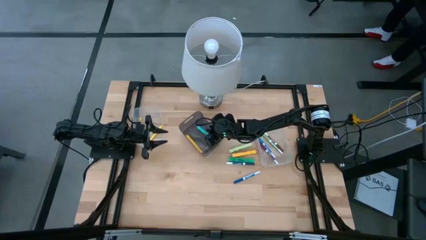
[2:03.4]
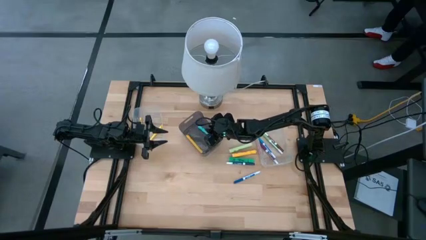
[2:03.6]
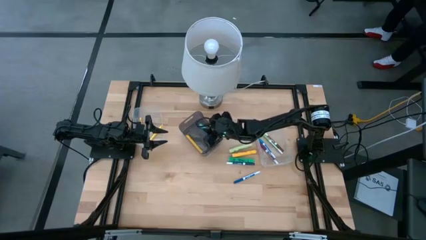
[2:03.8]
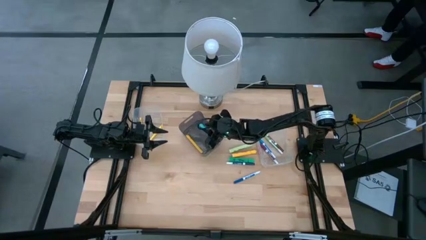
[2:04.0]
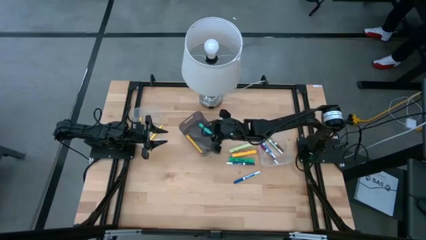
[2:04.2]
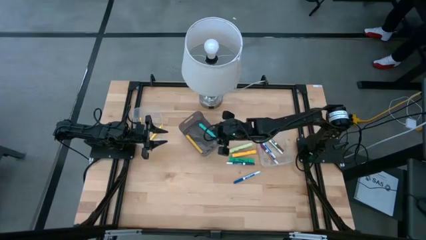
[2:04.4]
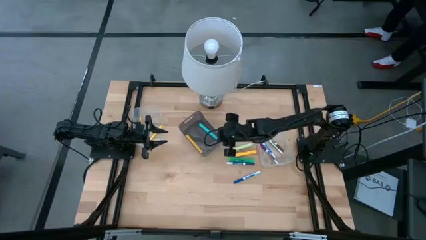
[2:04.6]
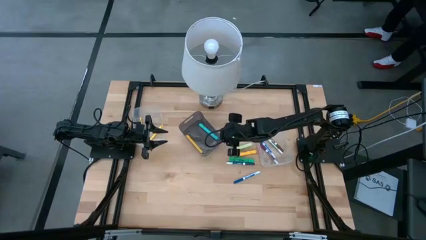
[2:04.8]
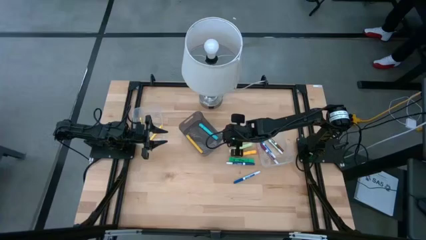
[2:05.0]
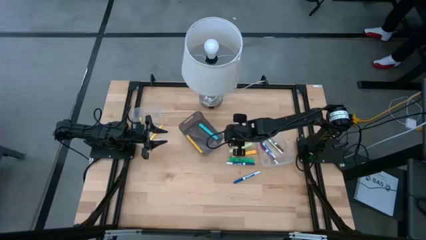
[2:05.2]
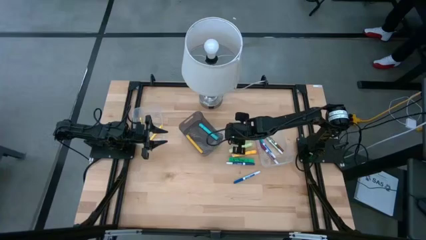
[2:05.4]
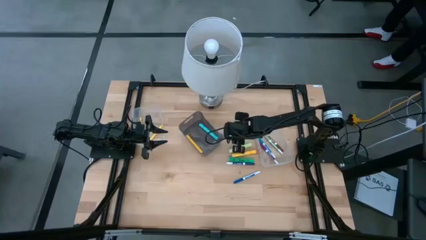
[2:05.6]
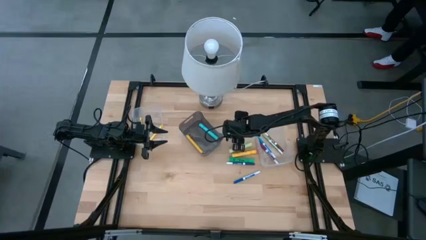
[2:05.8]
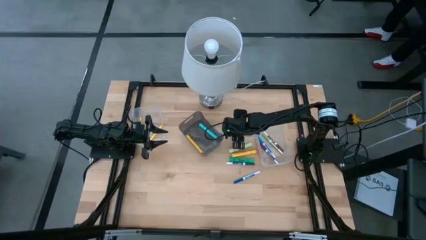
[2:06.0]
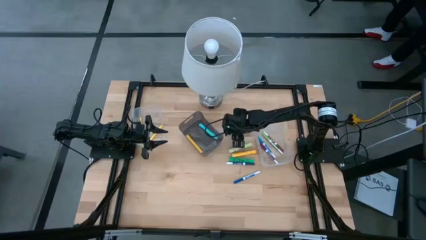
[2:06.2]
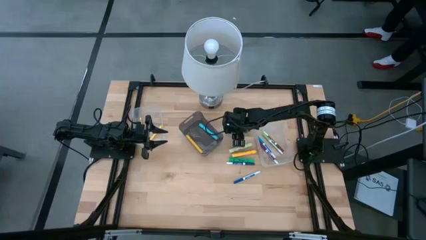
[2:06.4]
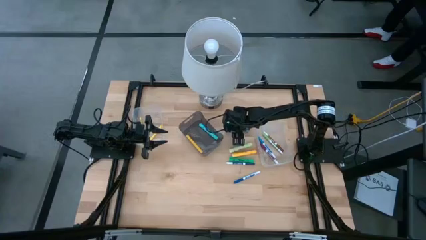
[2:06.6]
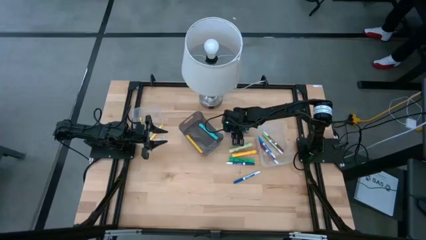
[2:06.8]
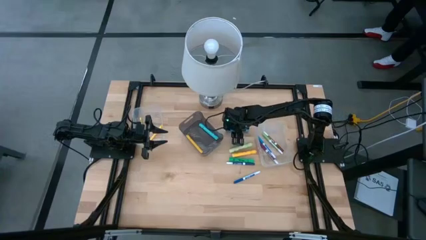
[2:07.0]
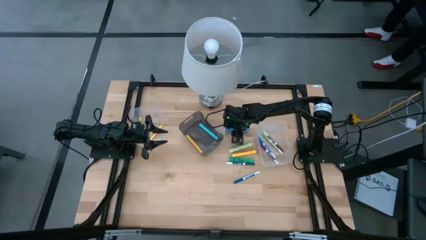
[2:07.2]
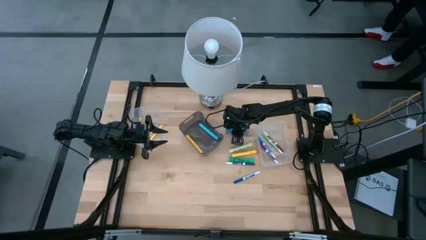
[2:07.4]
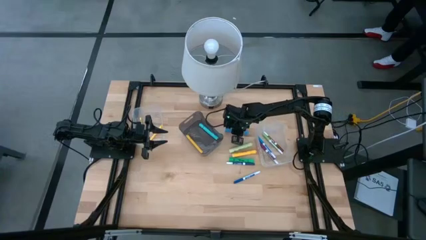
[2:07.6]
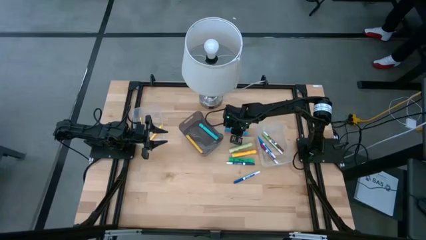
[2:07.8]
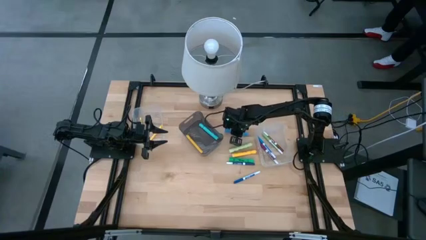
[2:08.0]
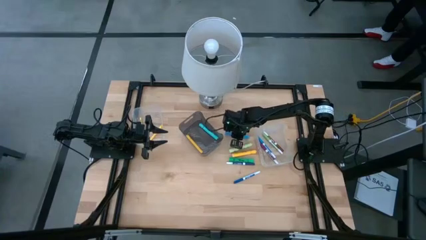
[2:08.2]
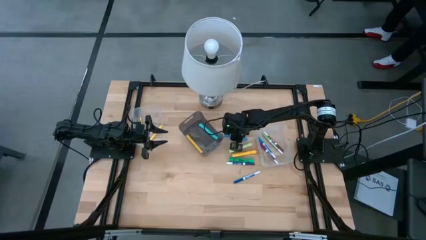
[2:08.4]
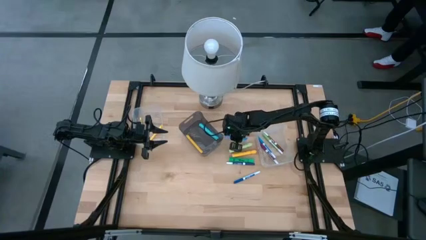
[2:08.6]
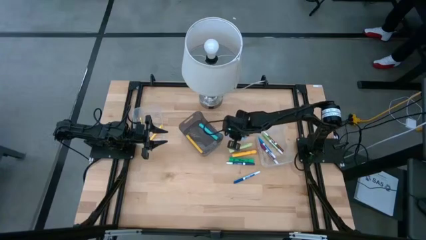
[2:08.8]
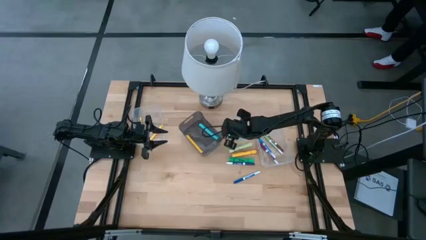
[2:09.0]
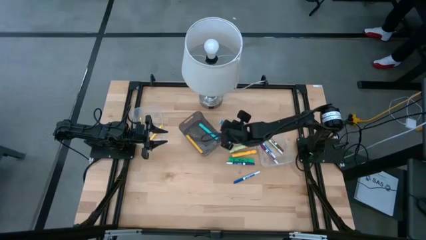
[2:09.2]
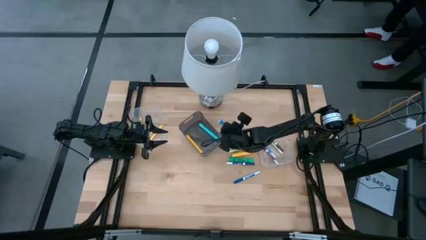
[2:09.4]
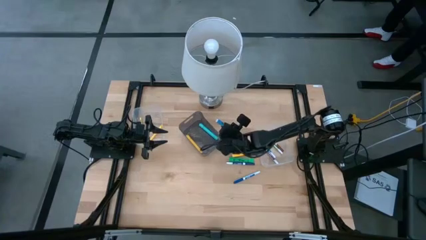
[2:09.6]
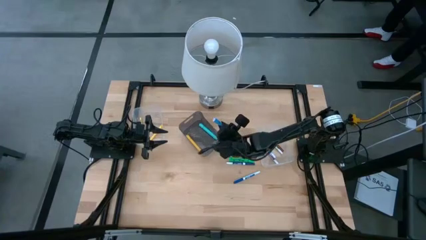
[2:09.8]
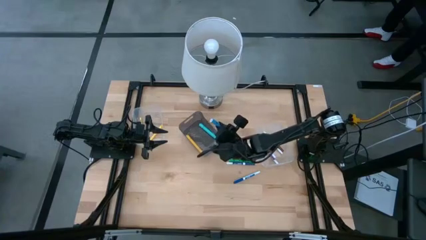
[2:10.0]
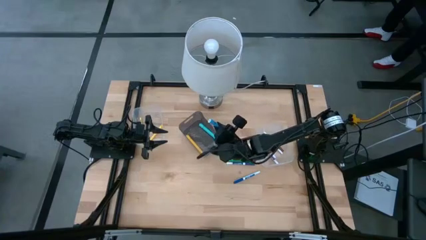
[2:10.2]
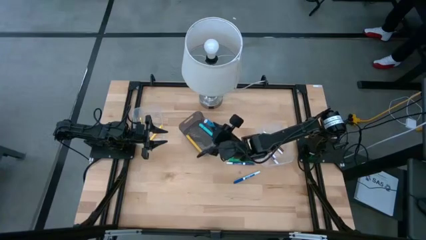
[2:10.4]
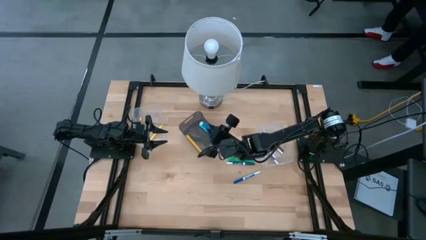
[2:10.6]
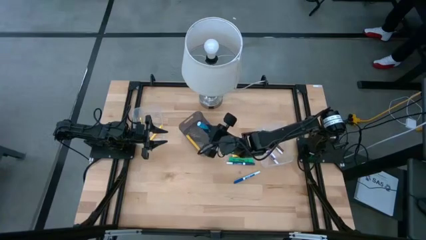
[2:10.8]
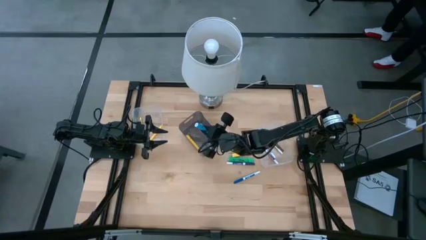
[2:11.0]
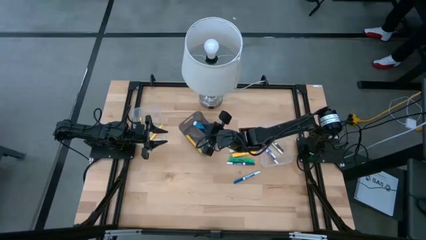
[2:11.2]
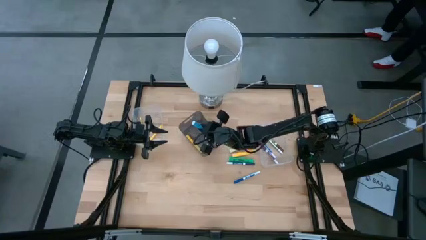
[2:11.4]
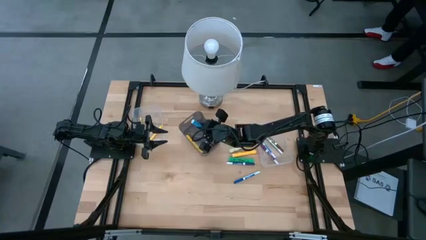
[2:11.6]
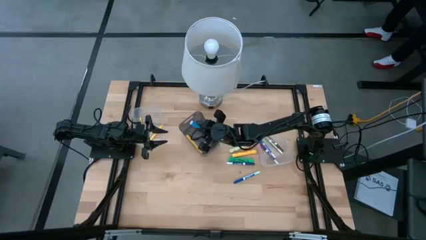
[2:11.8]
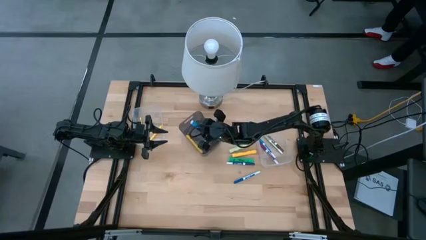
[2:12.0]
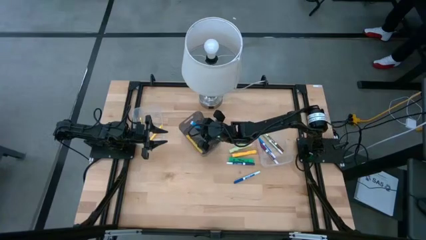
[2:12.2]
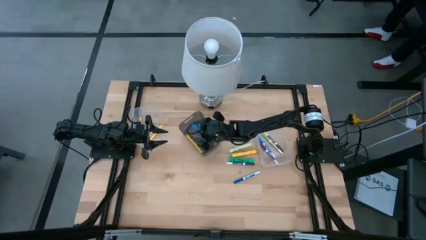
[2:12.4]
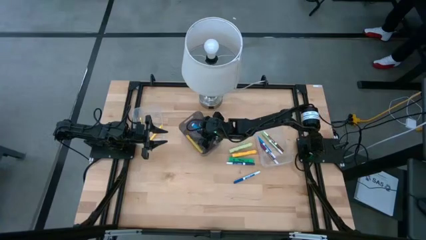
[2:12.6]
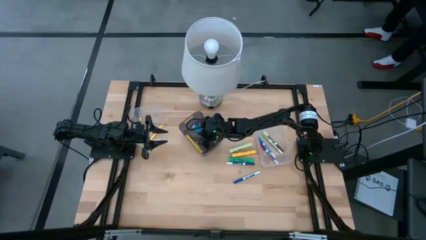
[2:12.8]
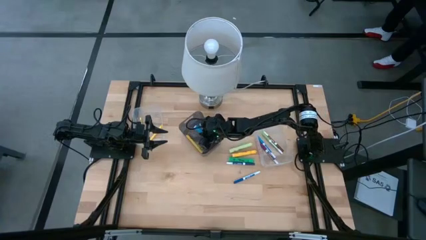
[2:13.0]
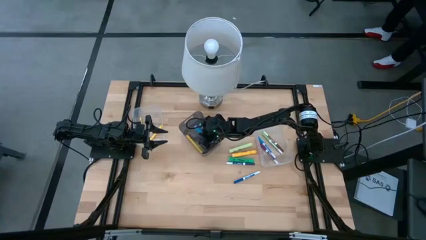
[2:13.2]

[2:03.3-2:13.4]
Task: Pick & Place Markers
Put the blue marker into the black bin
